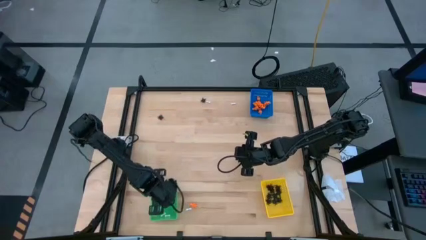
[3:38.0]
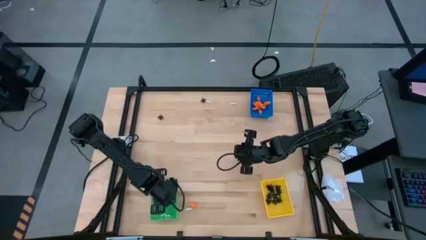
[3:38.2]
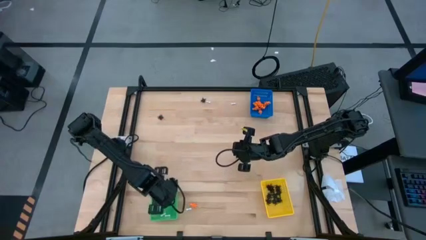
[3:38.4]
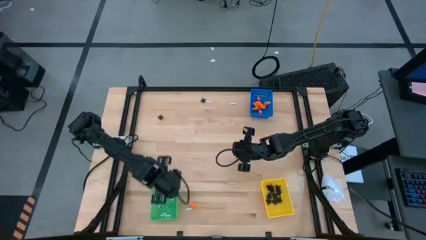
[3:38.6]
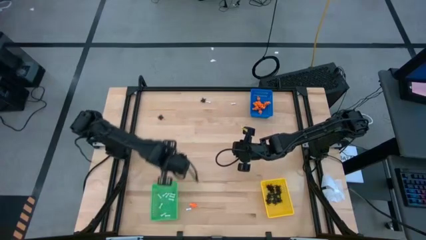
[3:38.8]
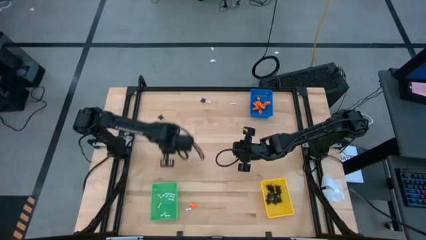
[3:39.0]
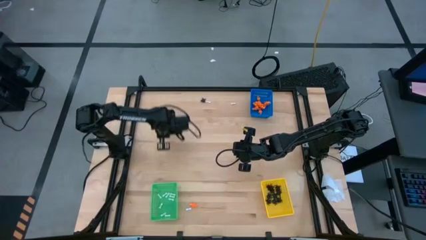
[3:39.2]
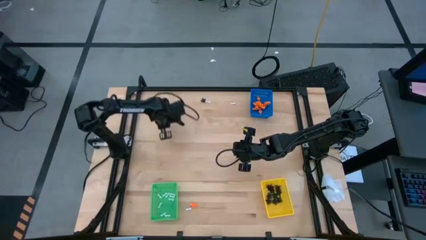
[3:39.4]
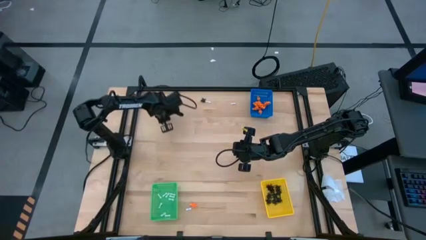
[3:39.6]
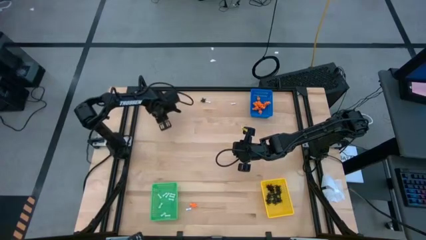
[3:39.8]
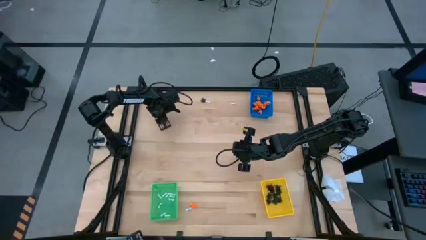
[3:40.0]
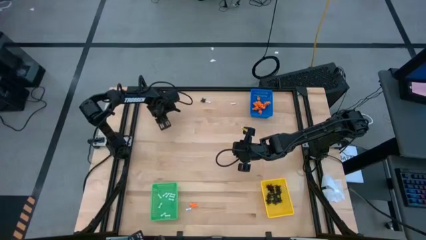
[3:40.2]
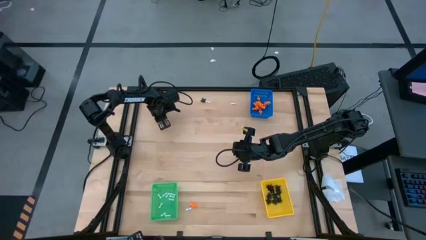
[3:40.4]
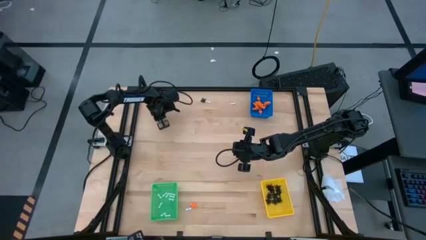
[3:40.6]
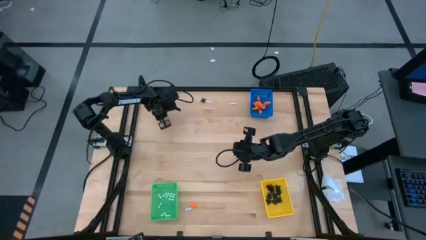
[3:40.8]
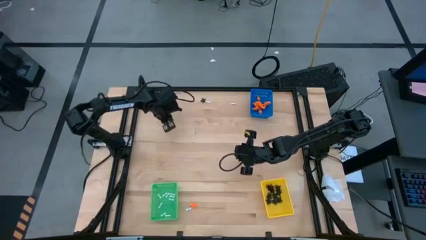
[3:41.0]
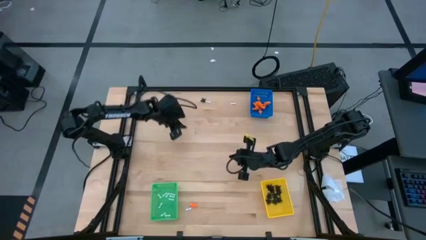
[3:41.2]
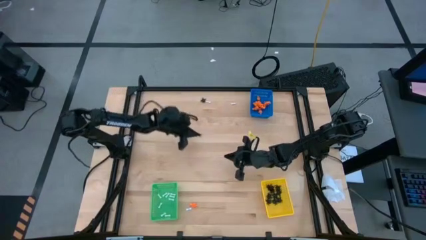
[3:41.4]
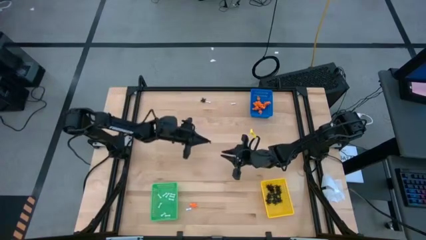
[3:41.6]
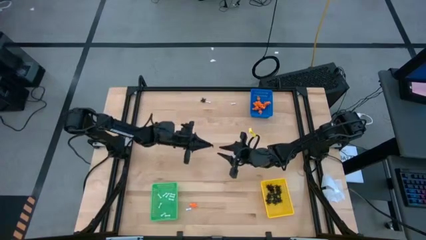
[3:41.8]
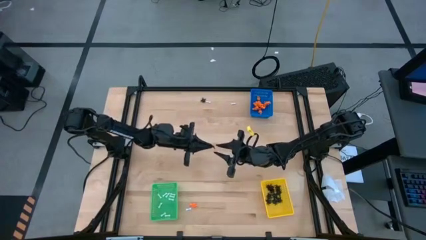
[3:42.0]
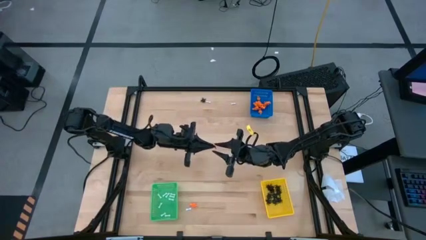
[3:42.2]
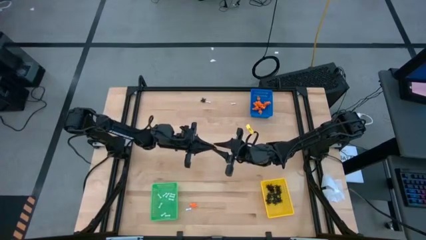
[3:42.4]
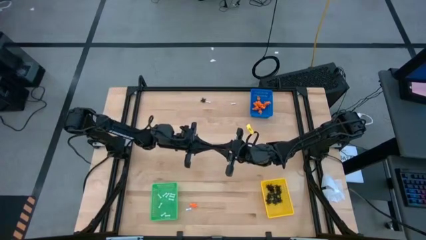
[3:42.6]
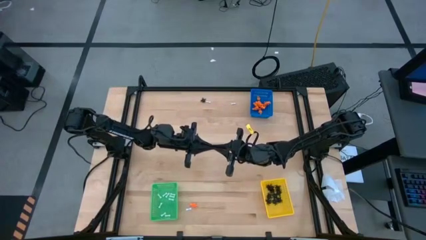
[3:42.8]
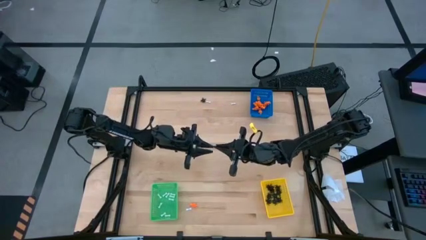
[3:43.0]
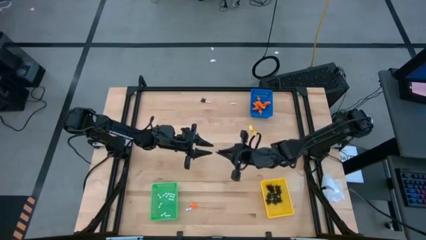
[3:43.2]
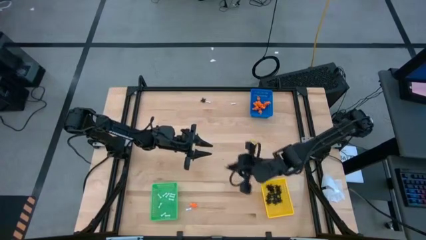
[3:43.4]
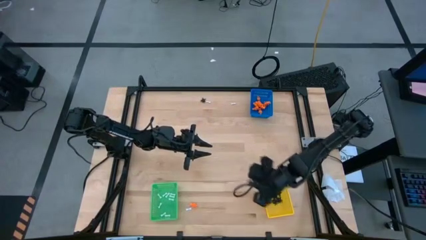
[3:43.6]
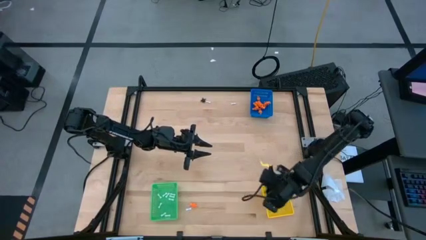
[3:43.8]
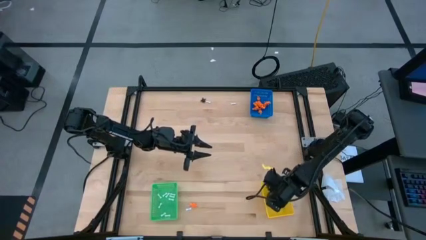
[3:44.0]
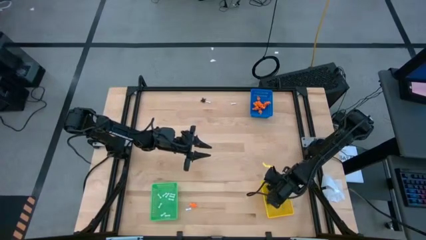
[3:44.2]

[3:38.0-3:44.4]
Task: Sort Halloween decoration
Put the black spider toy into the yellow bin

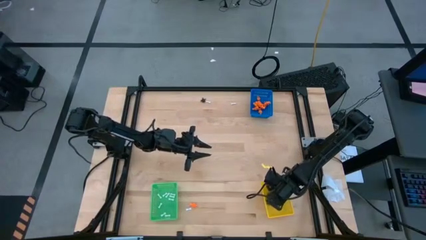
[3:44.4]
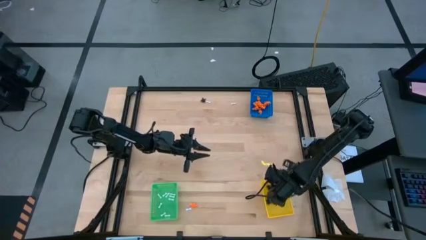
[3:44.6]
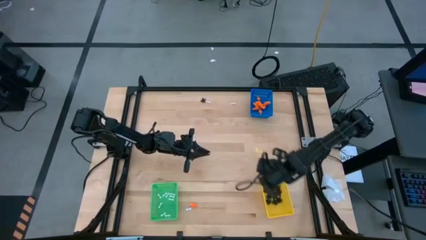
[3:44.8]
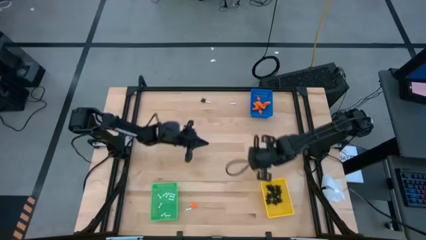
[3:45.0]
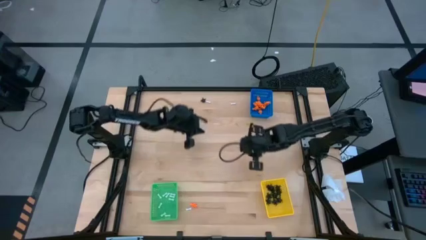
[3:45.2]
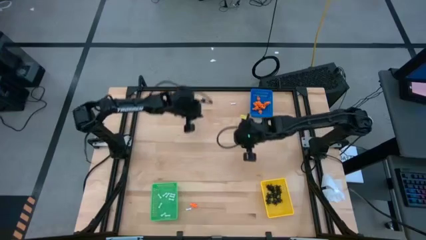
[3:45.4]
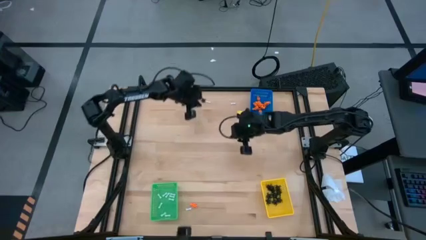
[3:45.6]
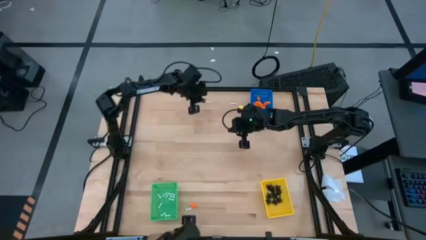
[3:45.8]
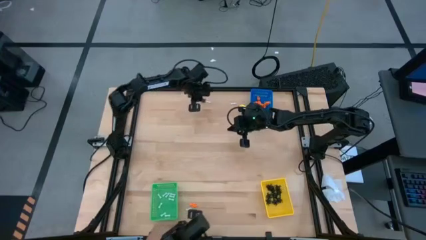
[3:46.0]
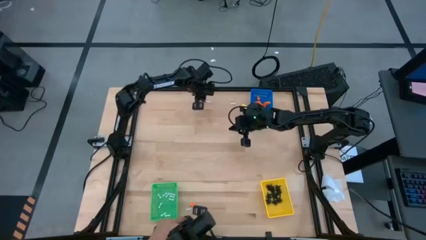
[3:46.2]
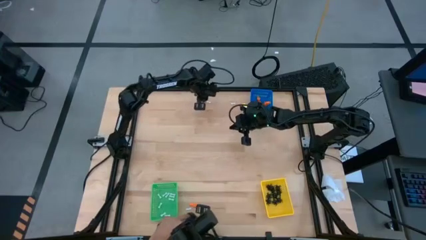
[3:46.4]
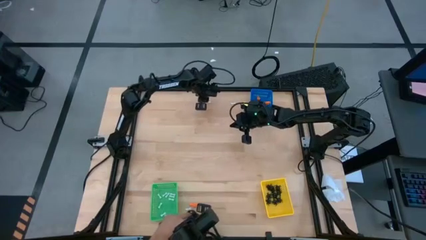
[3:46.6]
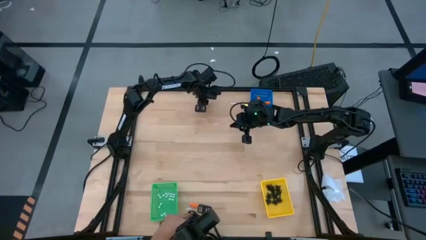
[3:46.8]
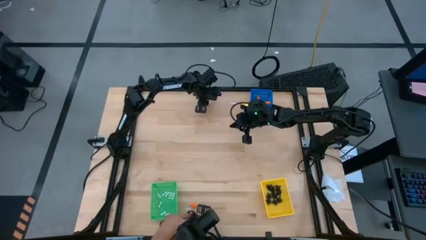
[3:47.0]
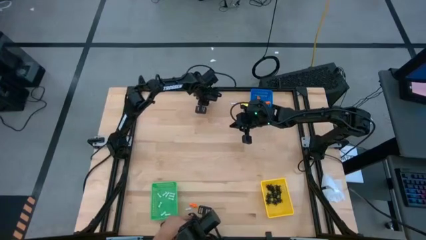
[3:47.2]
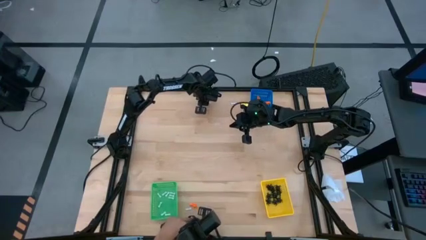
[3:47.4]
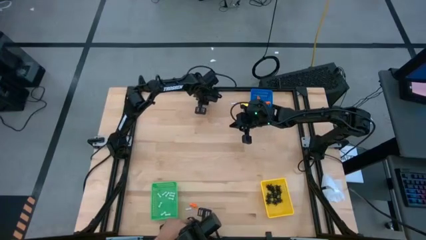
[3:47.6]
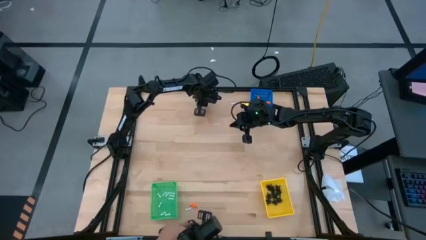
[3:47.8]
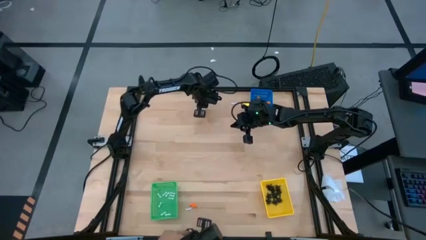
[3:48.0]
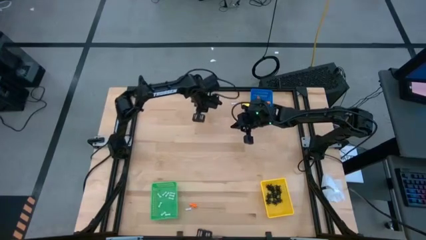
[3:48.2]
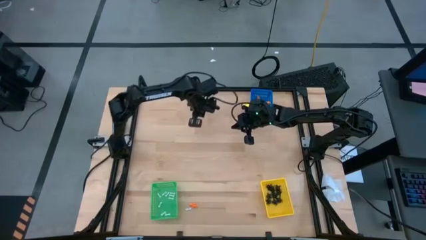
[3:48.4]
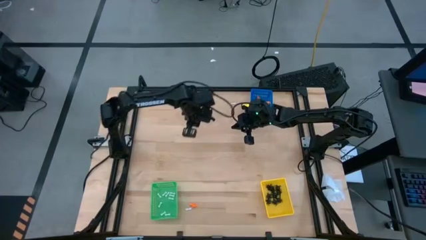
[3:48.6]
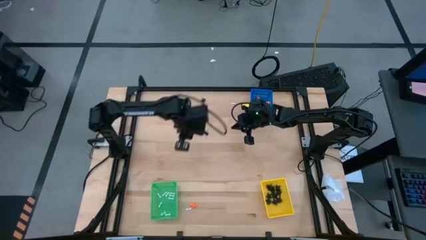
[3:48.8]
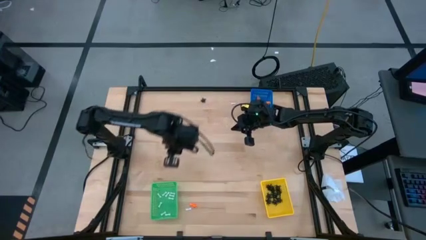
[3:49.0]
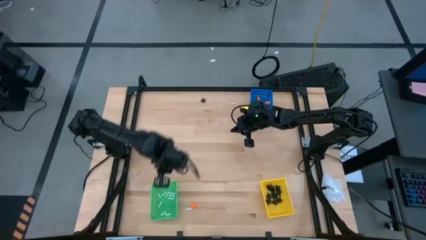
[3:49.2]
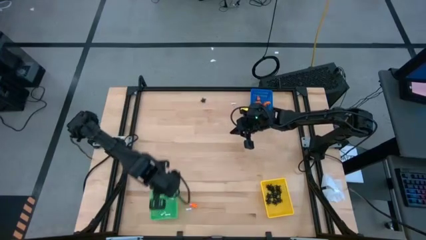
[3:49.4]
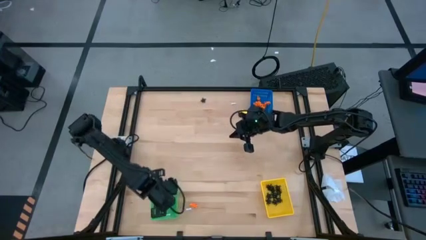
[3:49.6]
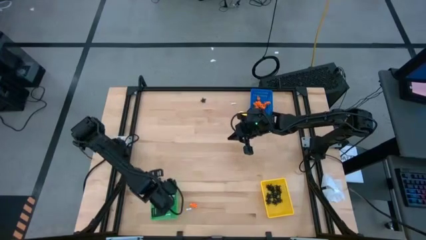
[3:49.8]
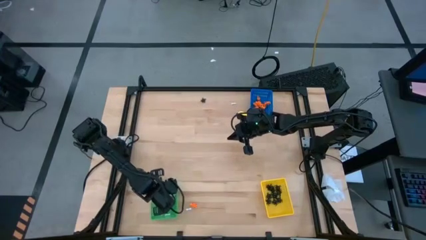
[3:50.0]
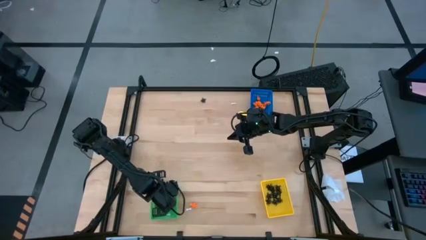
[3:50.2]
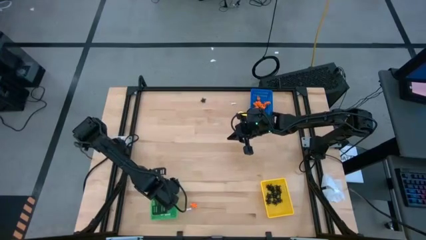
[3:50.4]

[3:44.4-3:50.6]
Put the white bone toy into the green bin

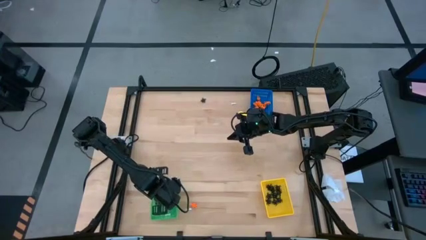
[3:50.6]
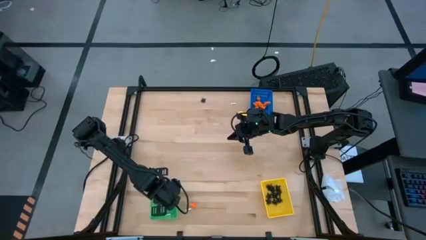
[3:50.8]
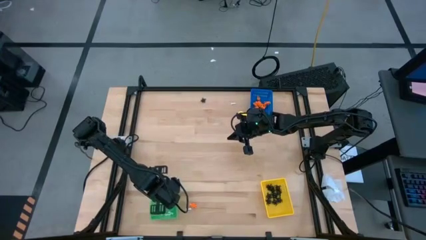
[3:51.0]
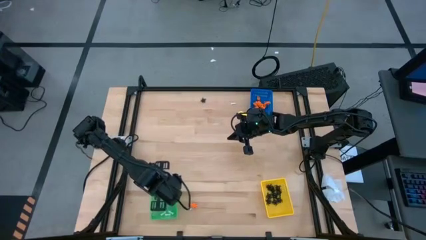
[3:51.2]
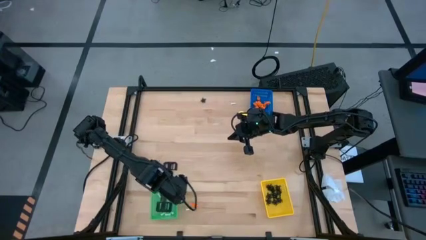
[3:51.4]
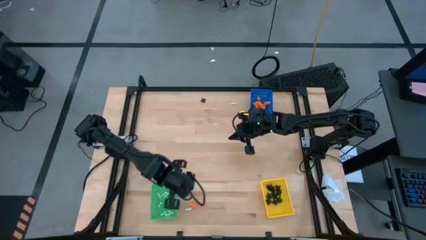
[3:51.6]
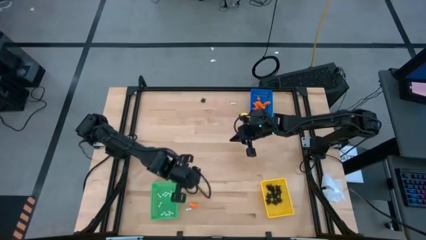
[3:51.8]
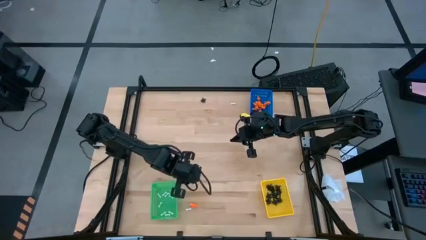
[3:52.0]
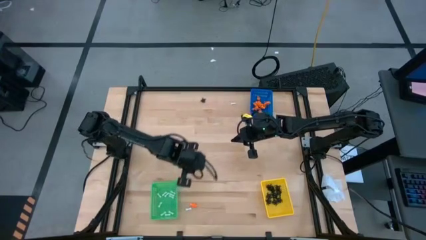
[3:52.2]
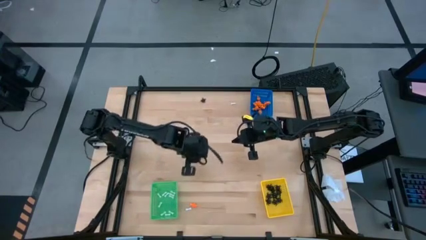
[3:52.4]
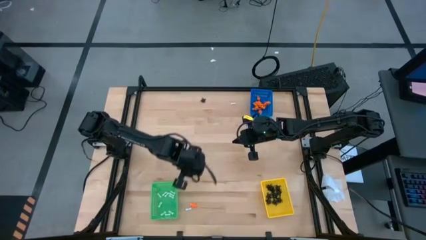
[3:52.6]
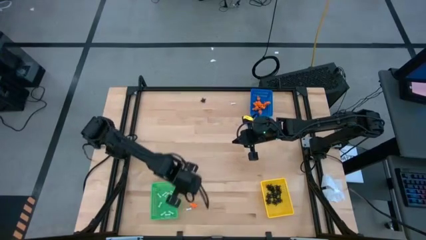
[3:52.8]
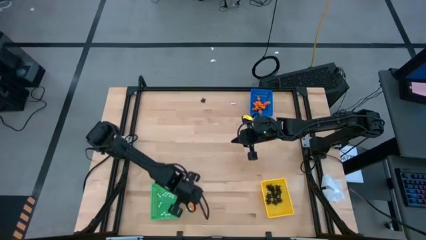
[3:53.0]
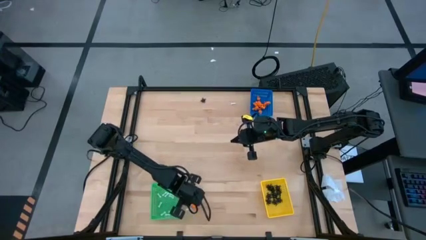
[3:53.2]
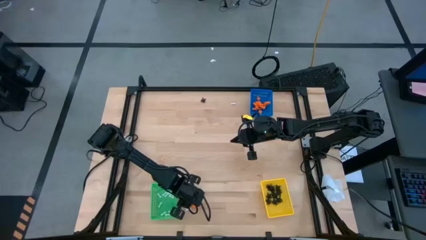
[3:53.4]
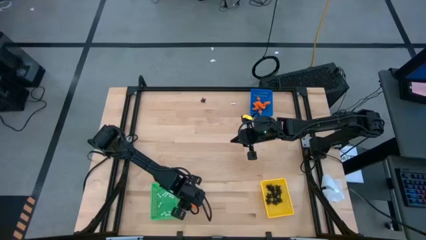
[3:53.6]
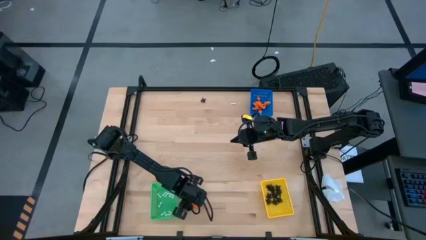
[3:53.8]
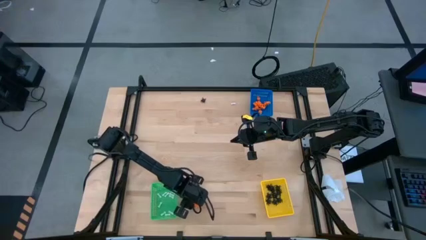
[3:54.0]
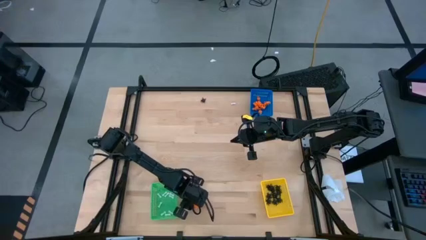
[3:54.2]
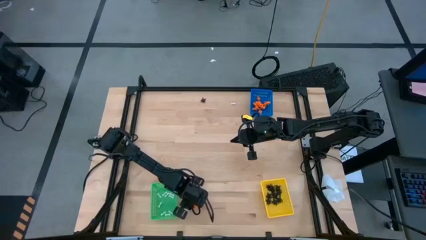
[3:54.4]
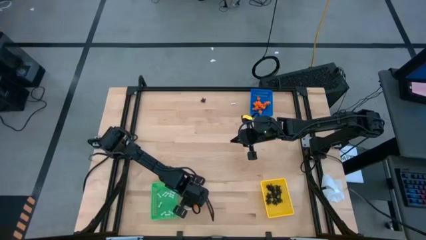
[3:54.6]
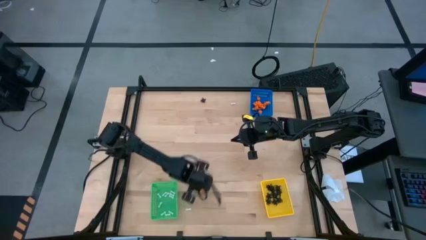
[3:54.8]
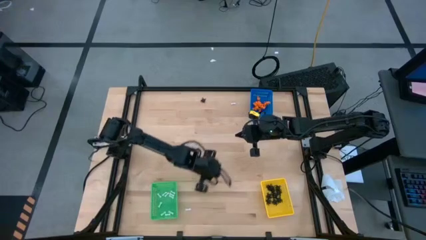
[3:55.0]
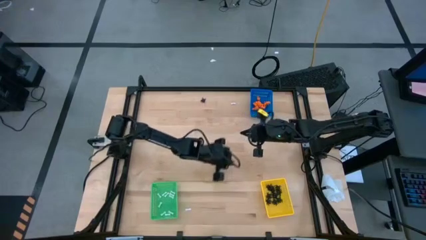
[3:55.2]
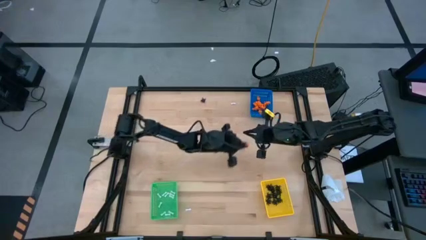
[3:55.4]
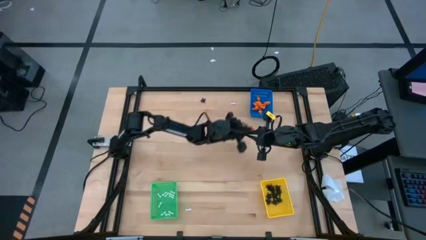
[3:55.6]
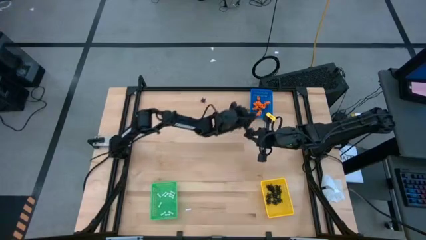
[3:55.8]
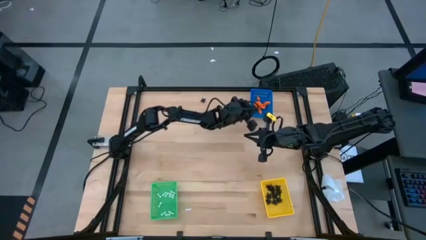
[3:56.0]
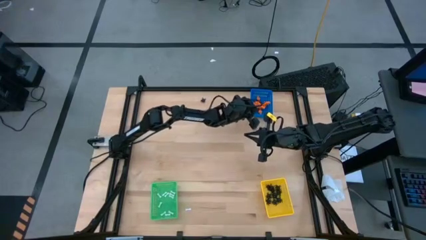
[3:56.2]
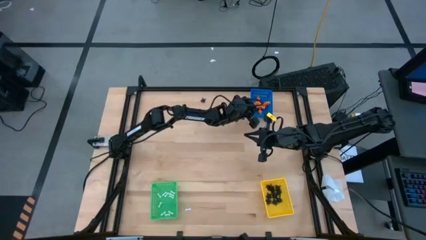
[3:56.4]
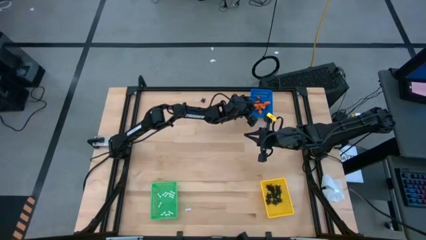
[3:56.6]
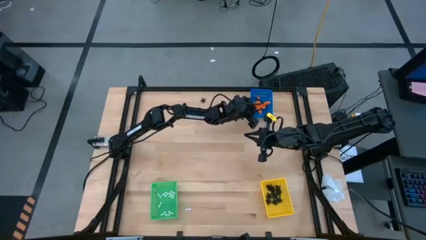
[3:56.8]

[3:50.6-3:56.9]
Put the orange toy skeleton into the blue bin
